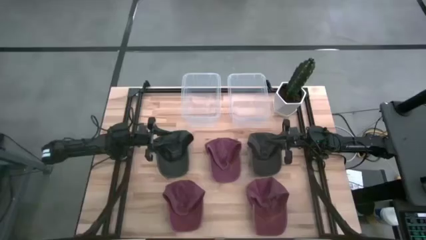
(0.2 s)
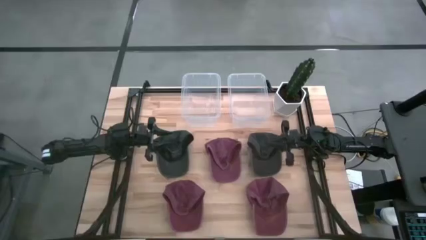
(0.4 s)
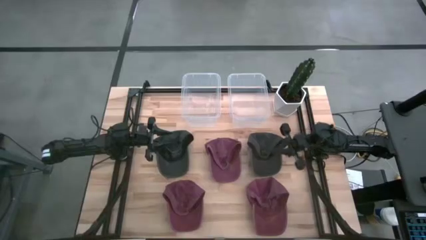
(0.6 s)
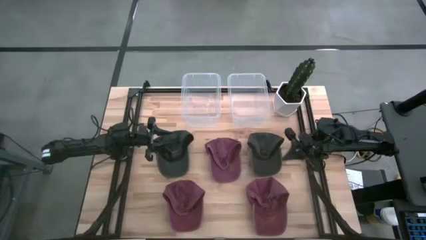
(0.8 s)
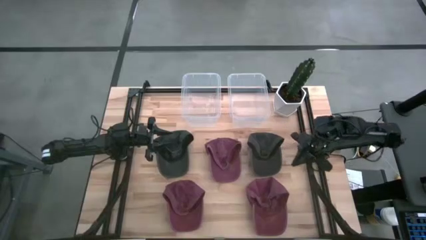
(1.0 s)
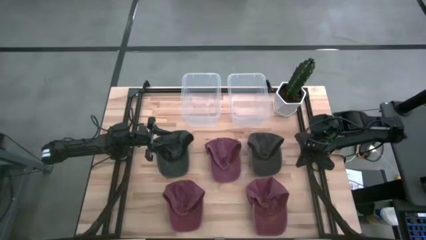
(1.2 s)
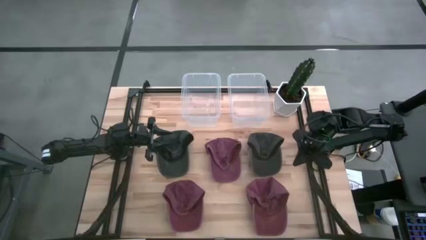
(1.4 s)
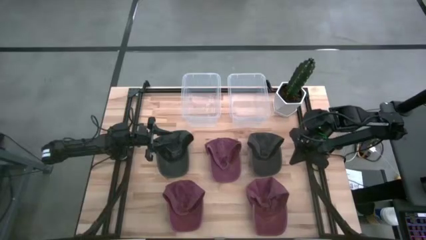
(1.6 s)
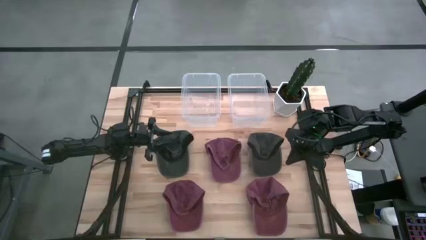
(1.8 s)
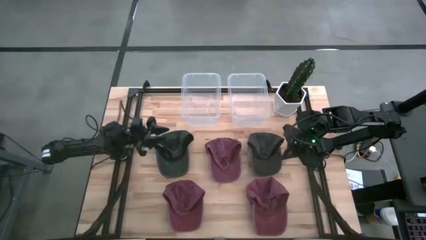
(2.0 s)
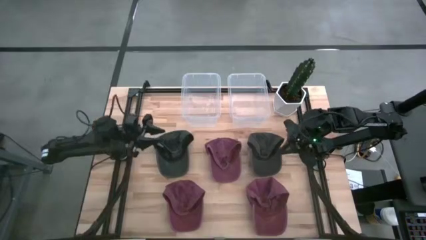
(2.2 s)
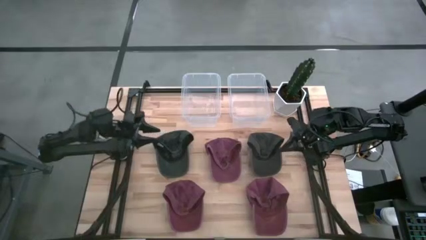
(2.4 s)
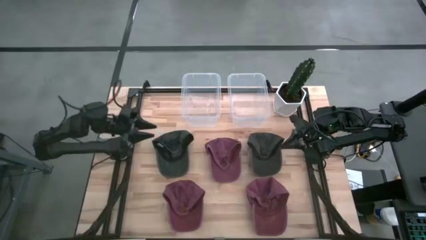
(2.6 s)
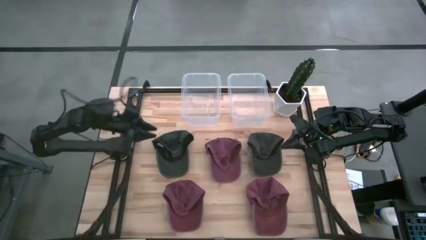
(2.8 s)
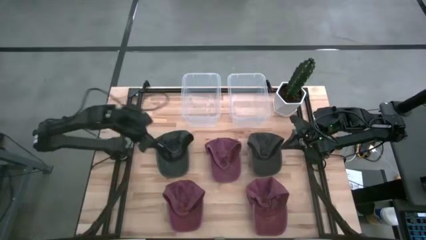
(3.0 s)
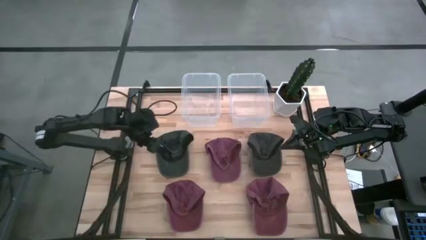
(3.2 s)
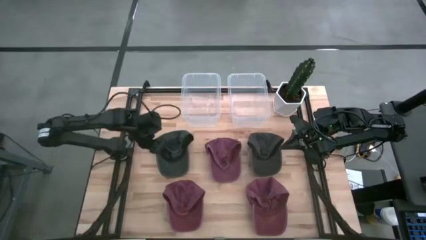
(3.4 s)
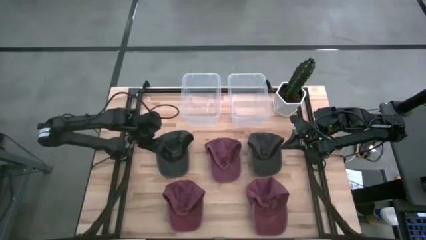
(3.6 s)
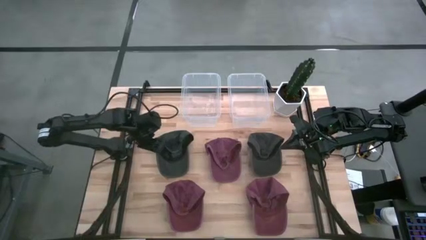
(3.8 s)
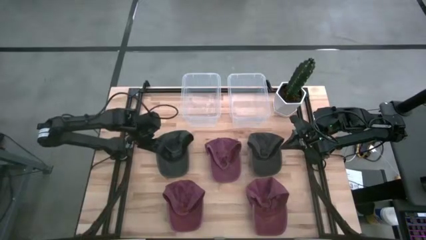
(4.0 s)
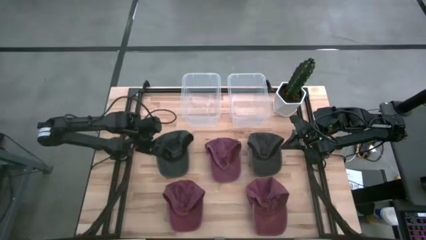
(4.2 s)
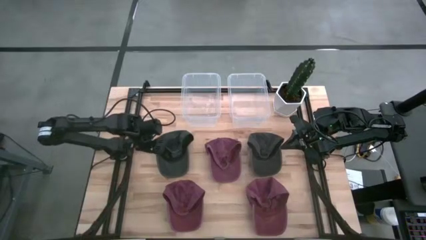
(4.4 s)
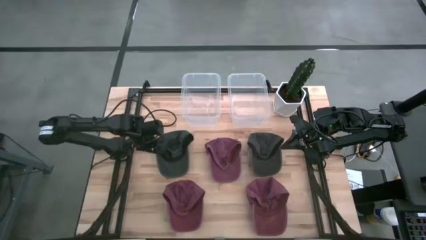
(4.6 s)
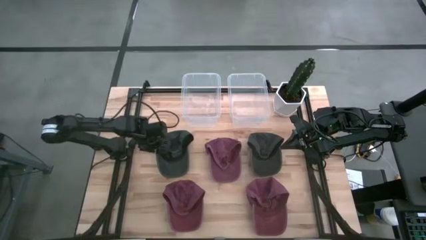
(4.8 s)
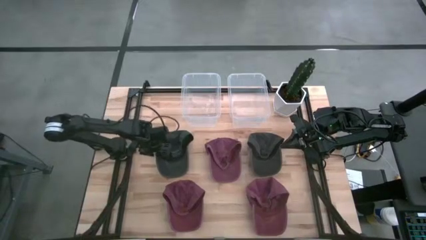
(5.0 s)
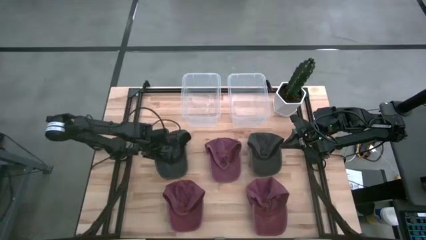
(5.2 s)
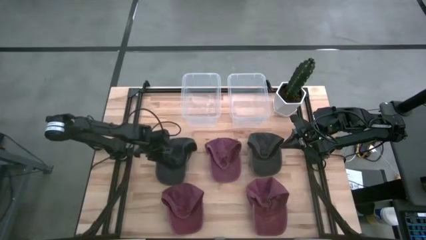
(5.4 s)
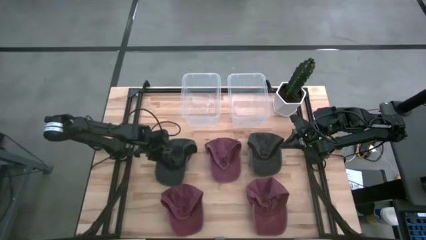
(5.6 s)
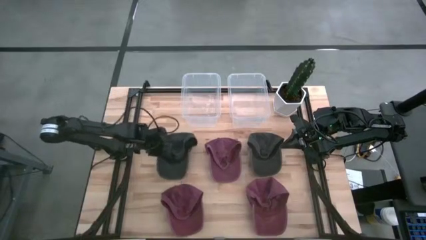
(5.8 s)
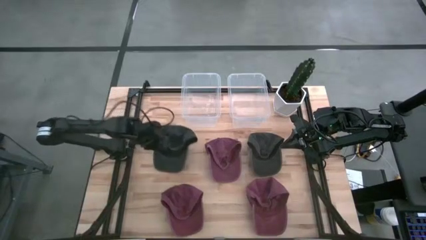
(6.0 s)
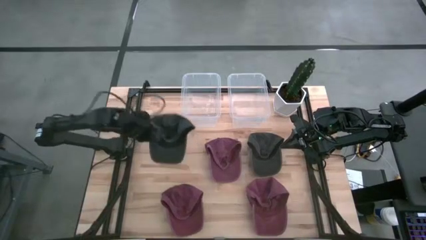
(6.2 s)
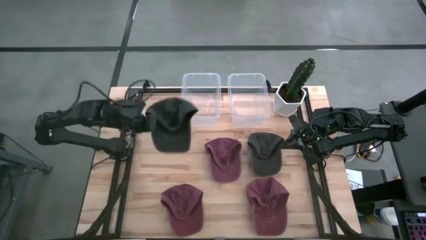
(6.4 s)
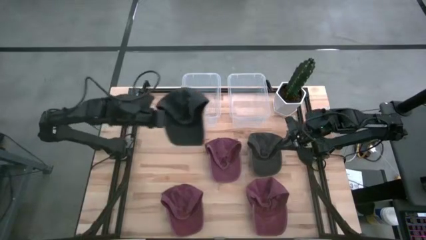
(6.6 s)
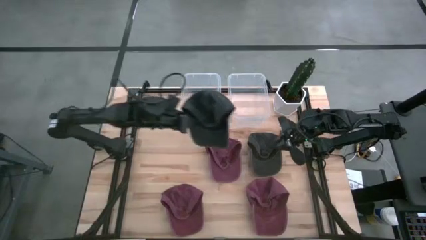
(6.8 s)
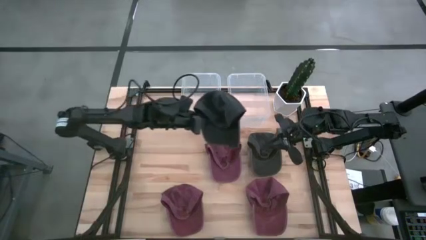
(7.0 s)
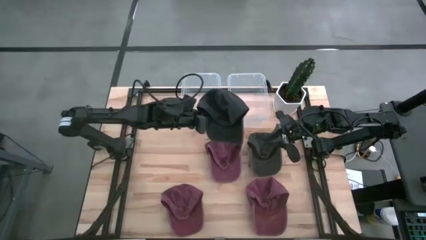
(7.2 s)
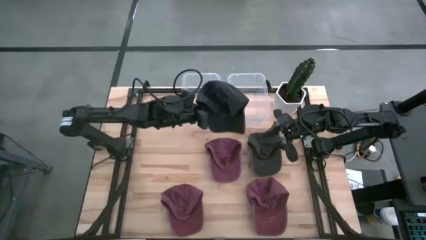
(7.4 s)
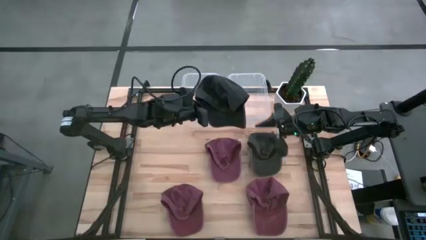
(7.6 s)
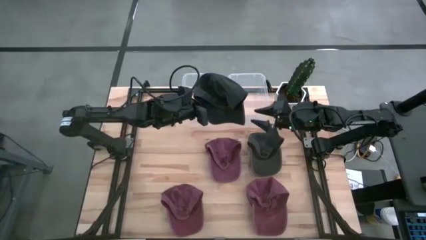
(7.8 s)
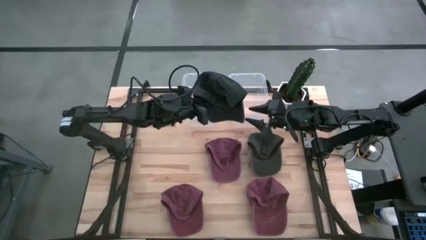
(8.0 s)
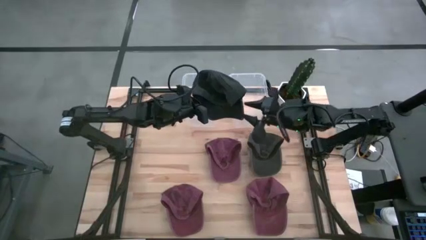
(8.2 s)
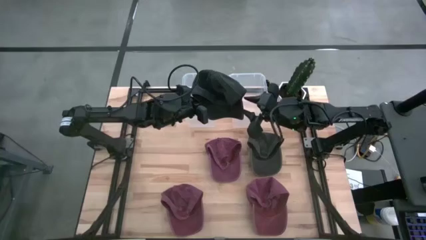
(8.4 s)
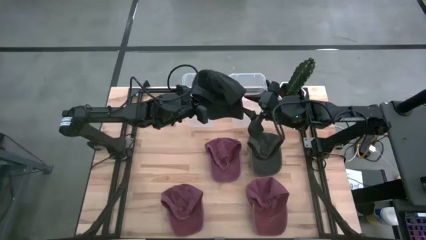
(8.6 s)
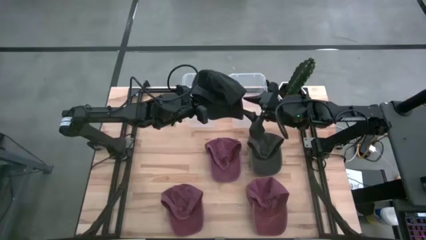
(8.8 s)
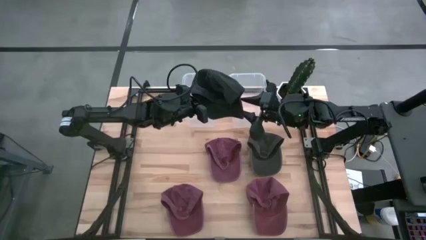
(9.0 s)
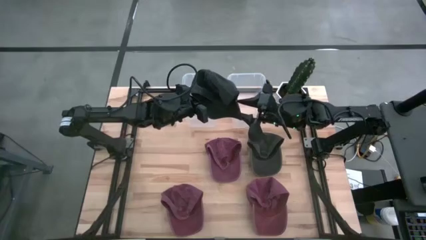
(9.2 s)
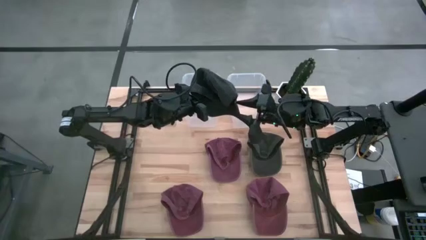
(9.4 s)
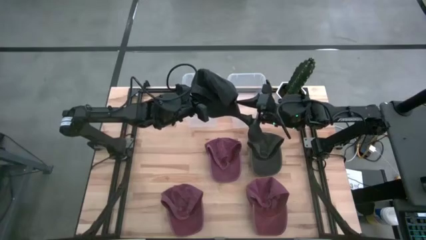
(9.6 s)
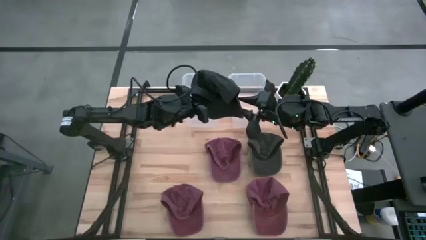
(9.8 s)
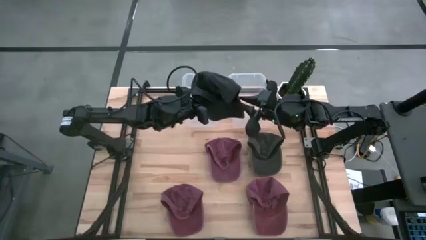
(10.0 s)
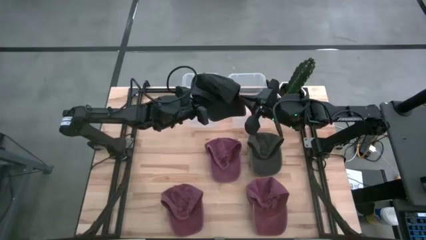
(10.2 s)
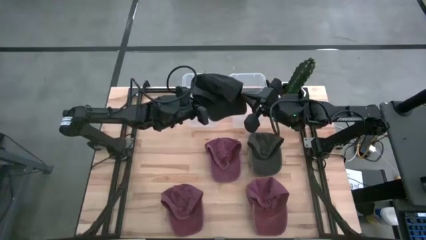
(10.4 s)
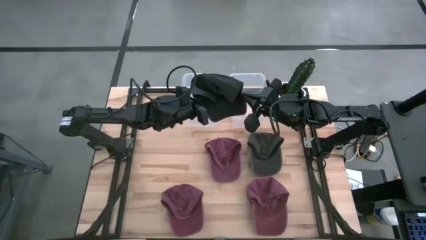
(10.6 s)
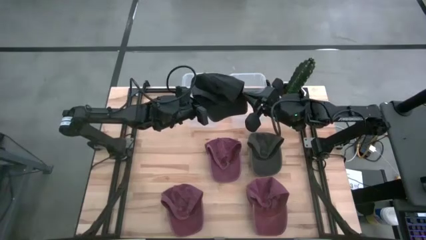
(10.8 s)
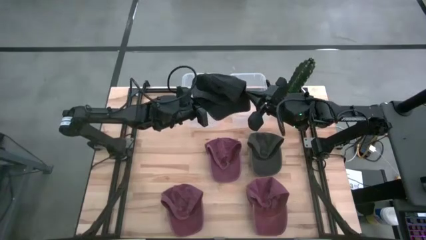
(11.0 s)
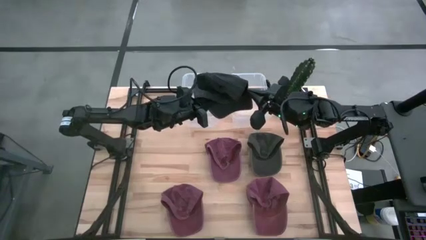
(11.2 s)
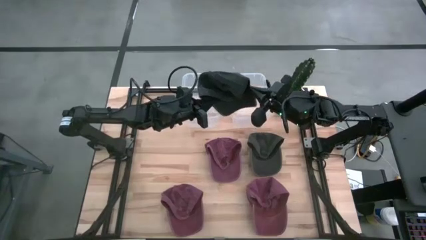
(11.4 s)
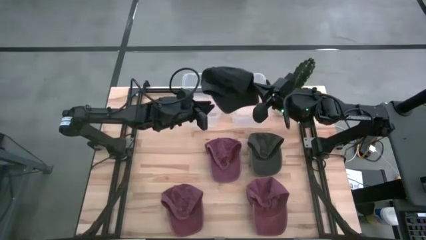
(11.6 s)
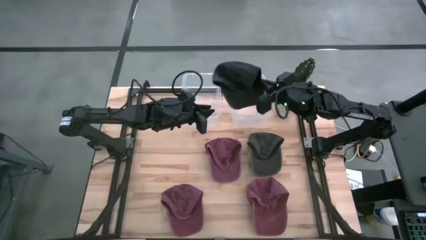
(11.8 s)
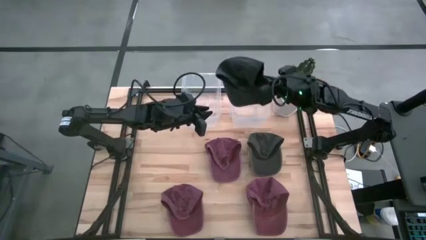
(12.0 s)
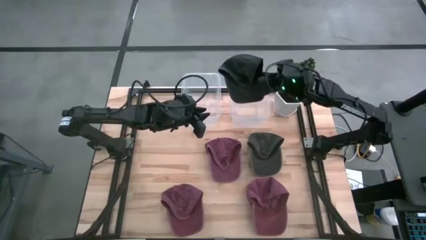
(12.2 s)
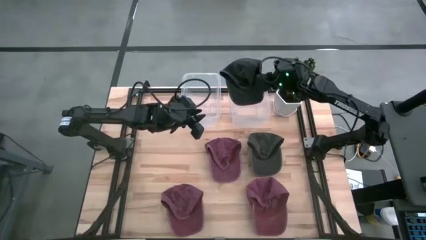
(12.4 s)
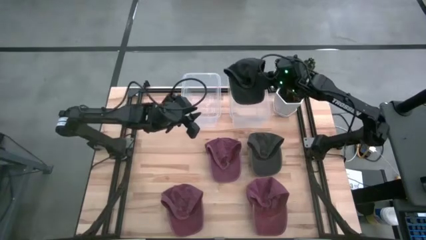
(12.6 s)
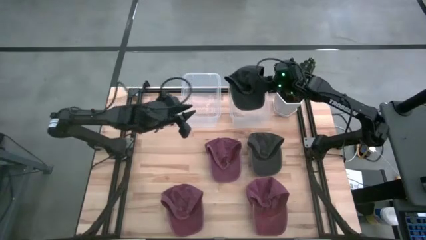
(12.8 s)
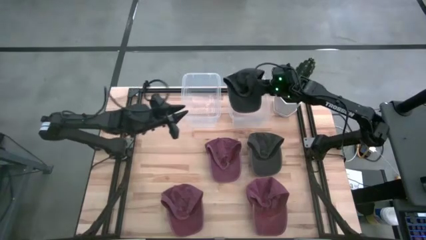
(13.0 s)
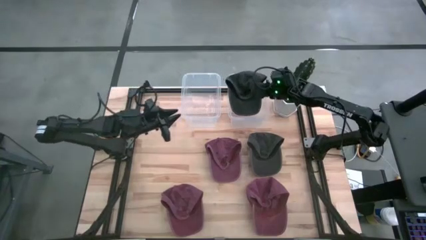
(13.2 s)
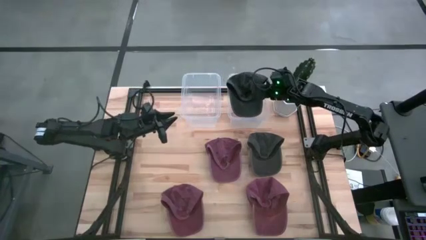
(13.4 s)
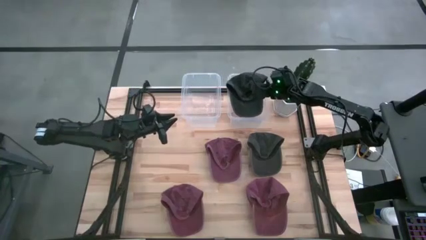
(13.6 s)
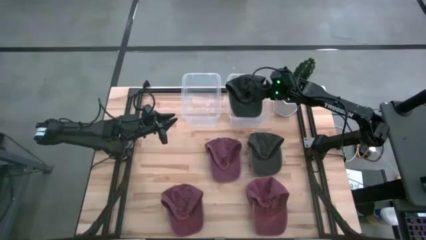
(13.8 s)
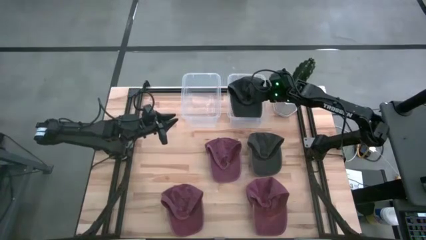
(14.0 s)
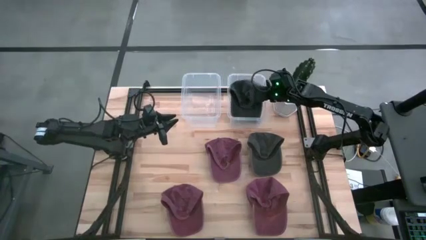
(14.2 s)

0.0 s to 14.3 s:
Task: Pick & Place hat
Put the left black cap into the right transparent bin
